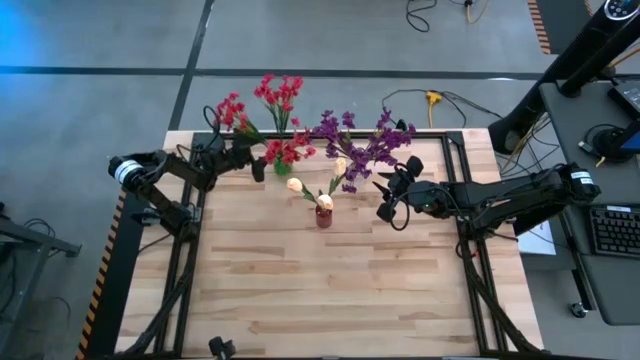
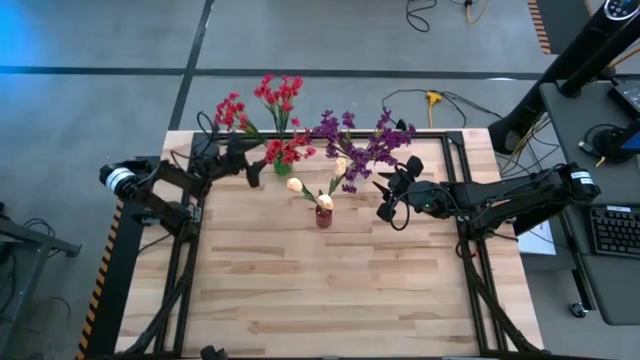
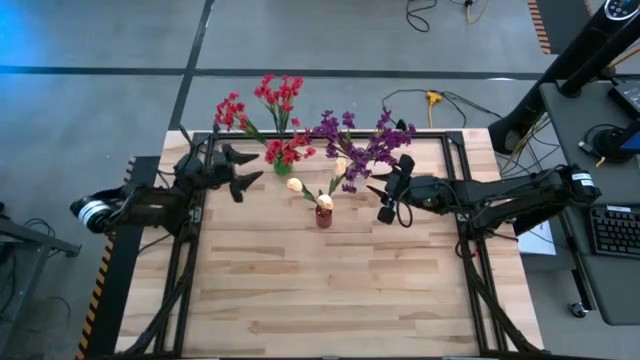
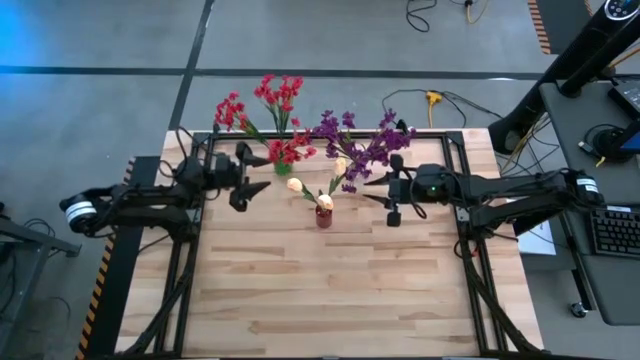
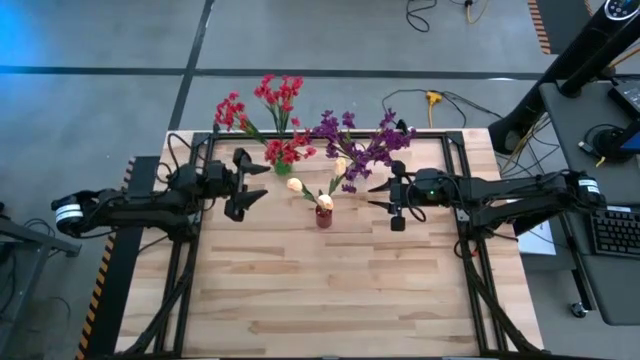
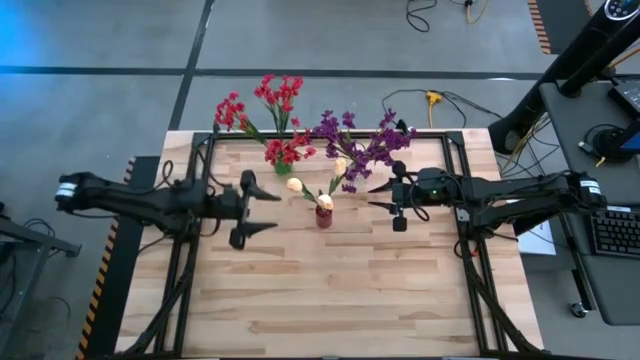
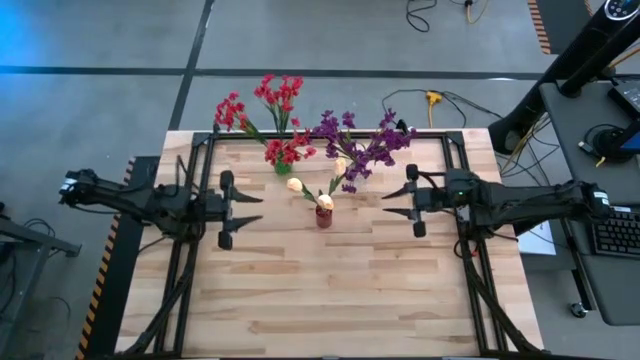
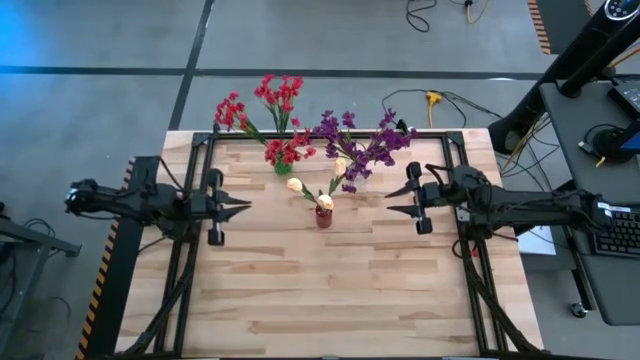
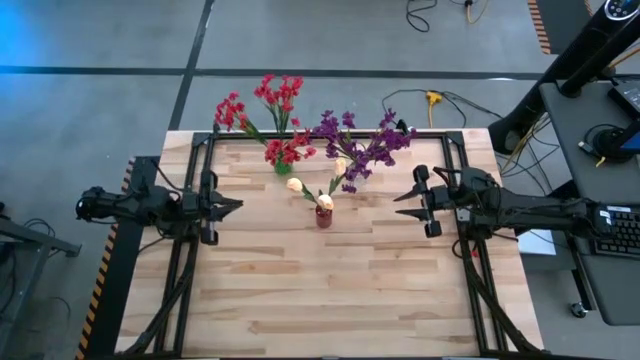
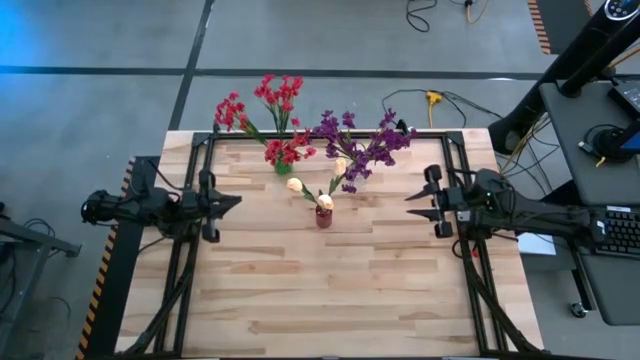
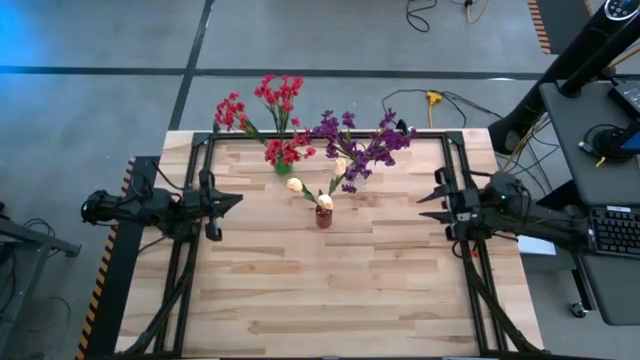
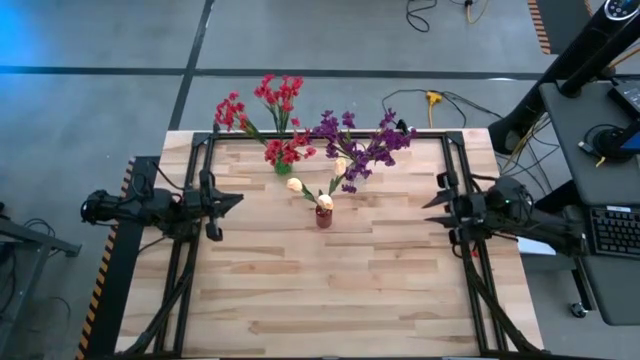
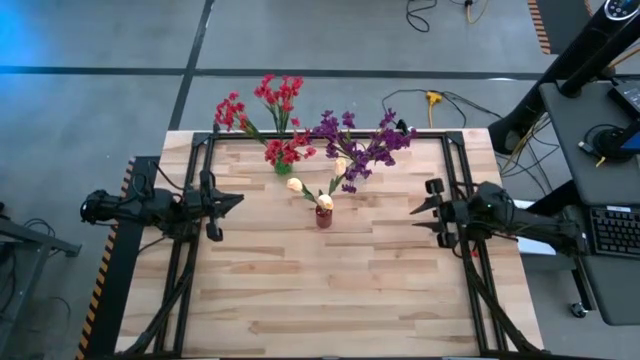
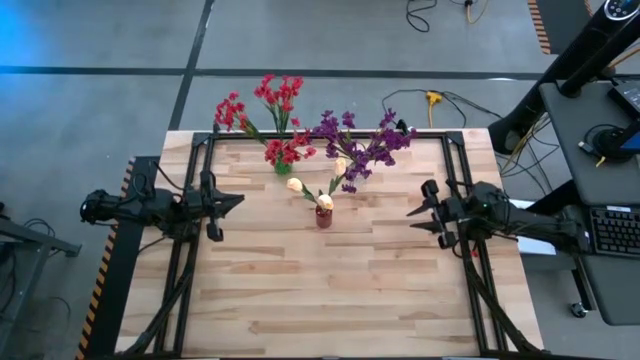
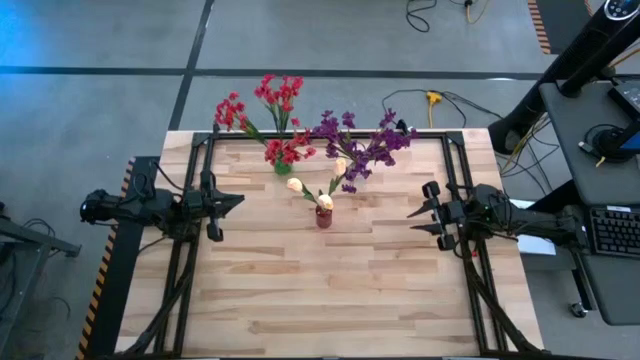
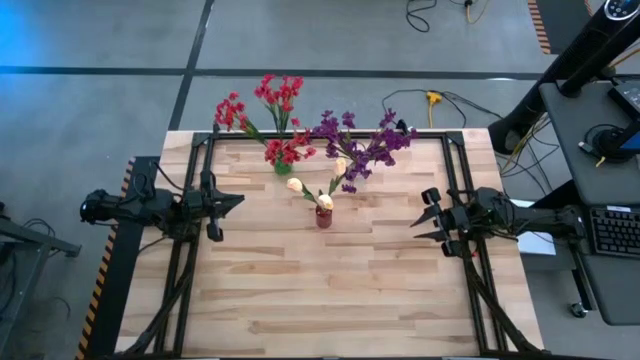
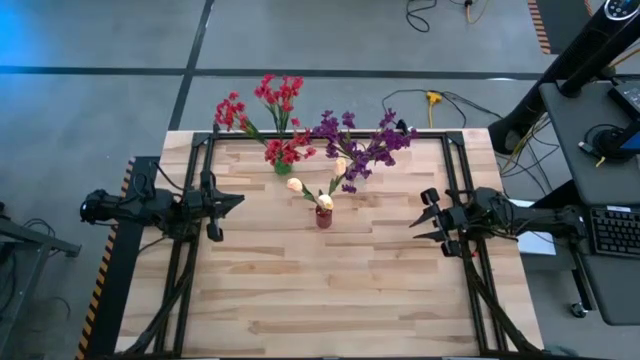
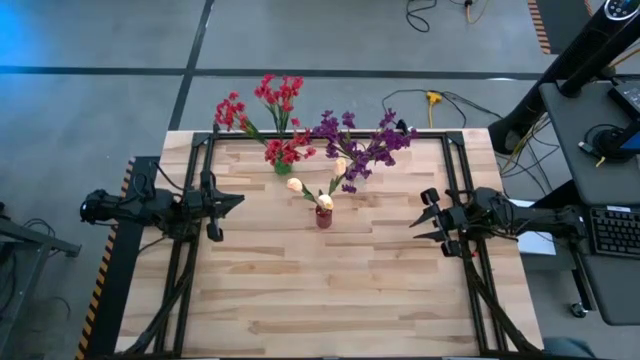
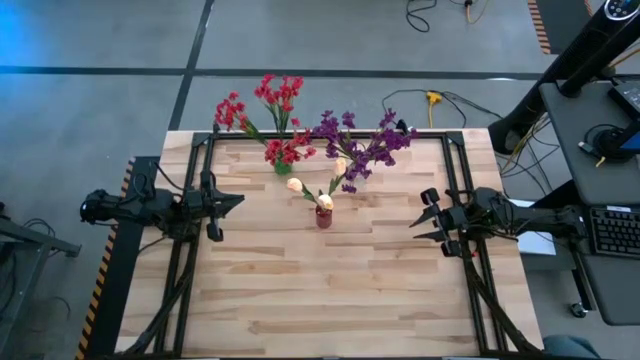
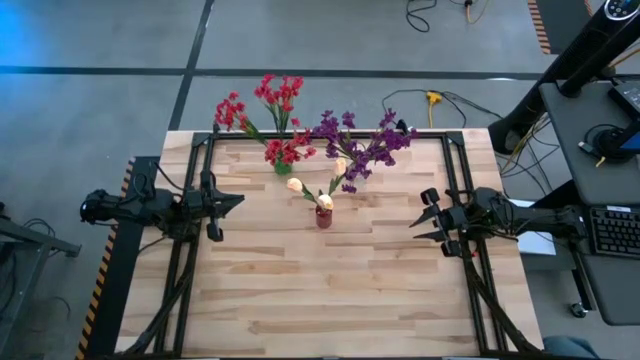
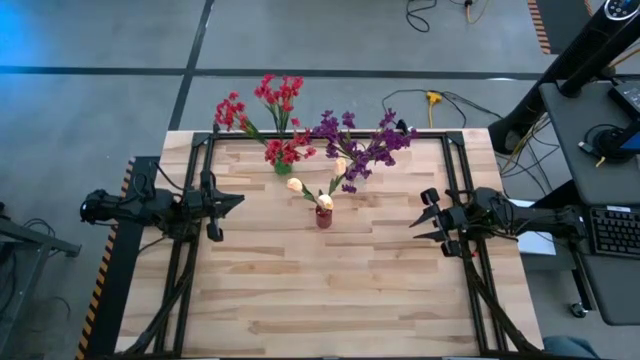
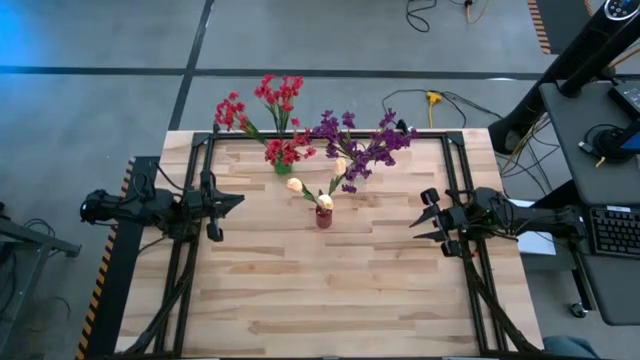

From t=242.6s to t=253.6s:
Task: Sort flowers into vase by color
Return to Home Position

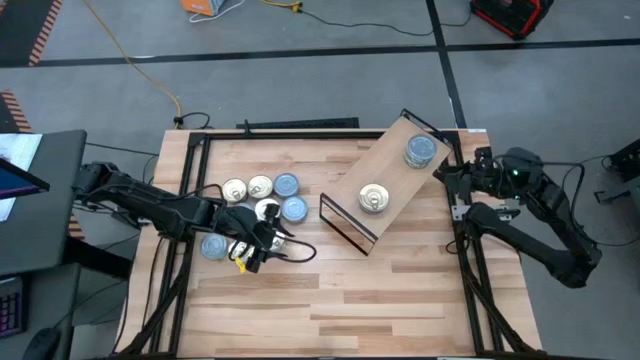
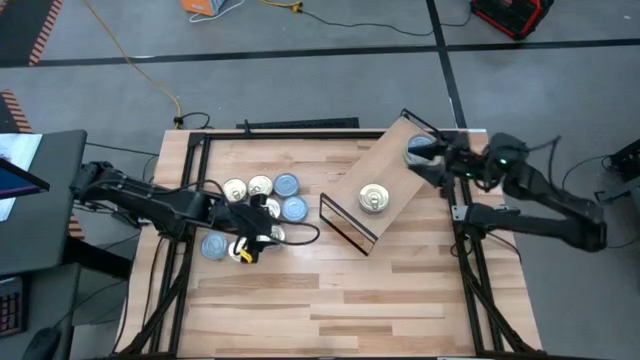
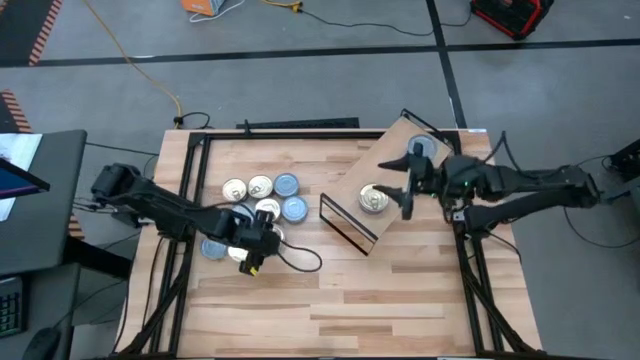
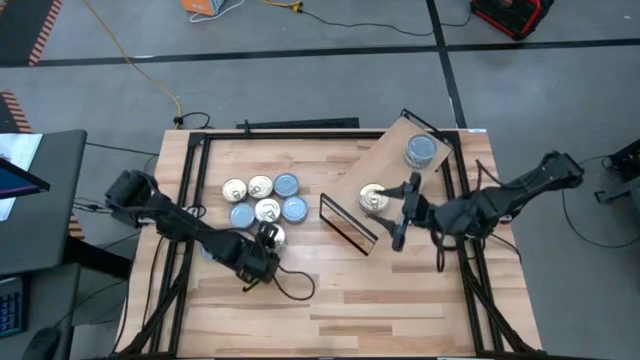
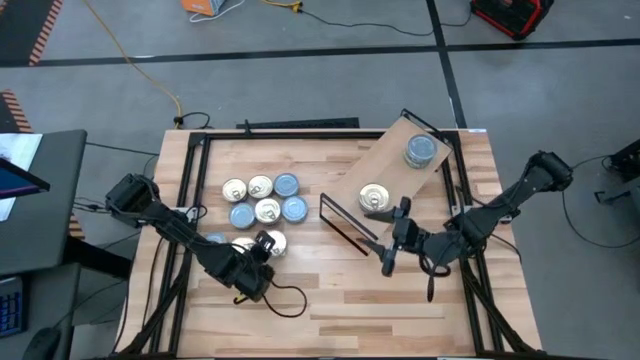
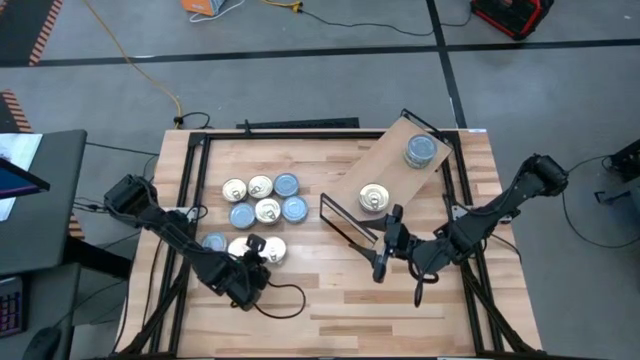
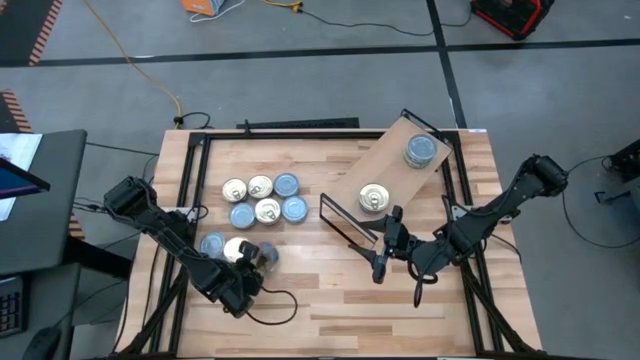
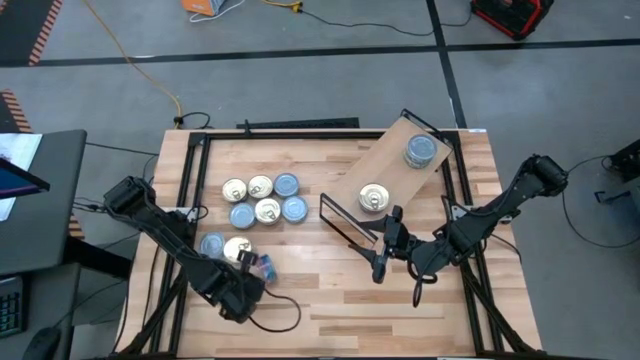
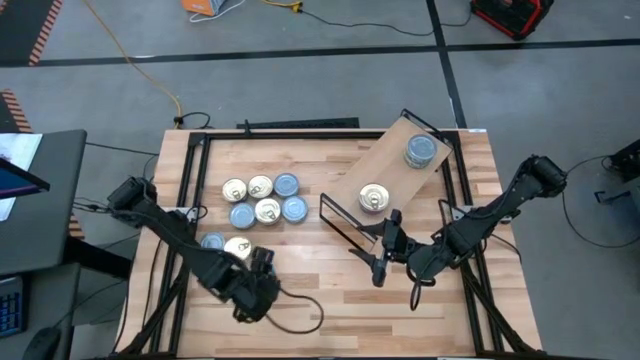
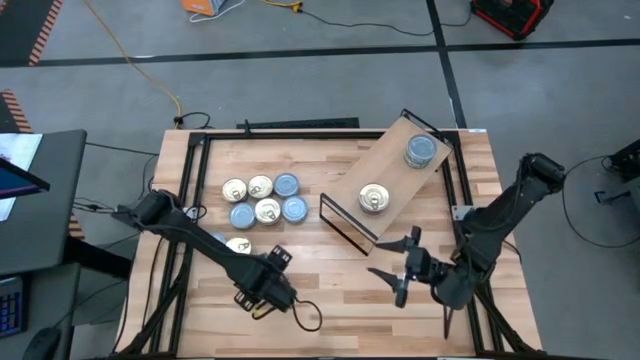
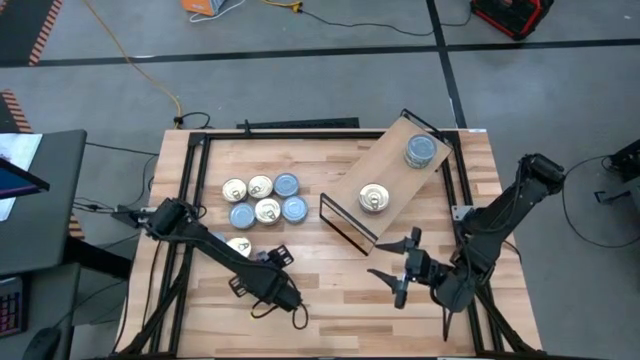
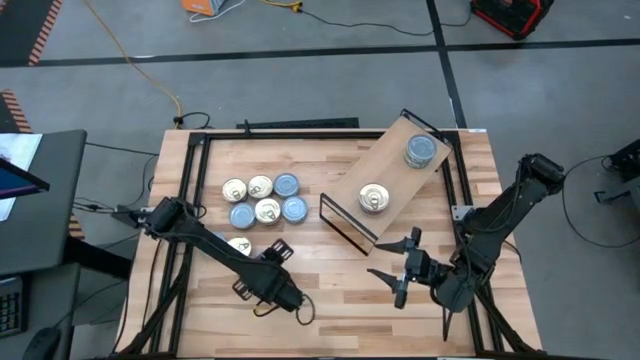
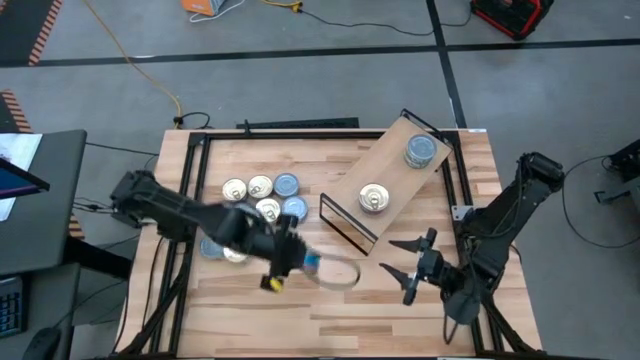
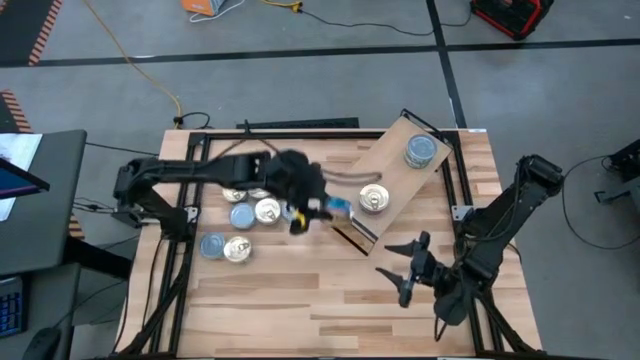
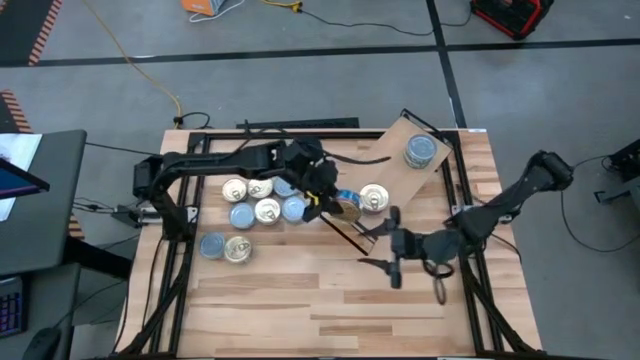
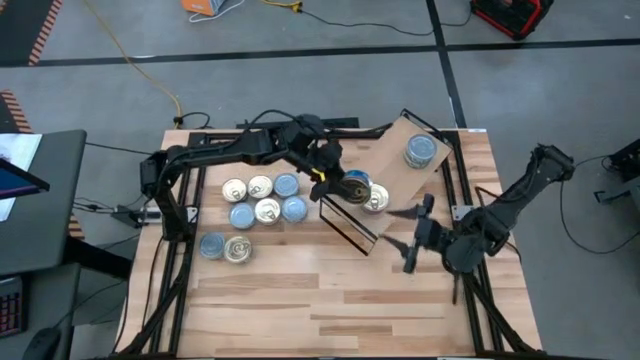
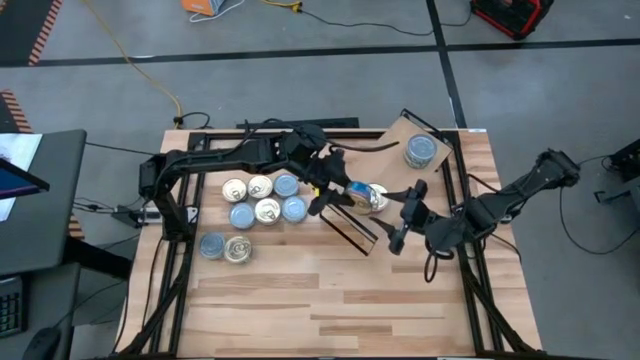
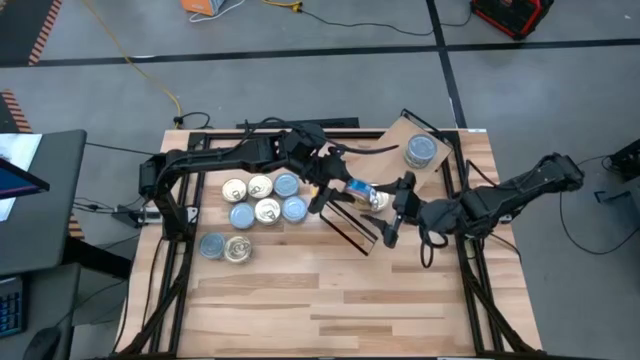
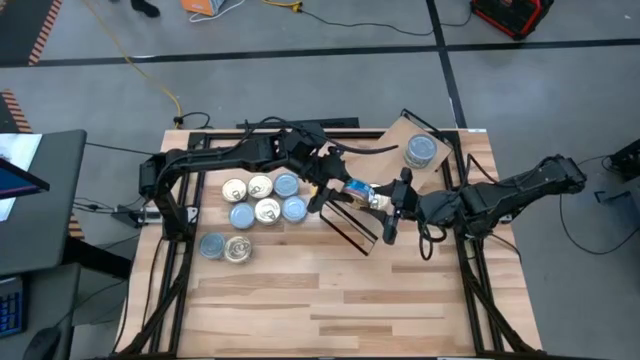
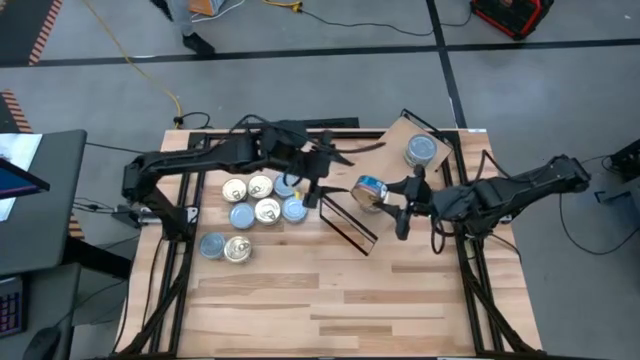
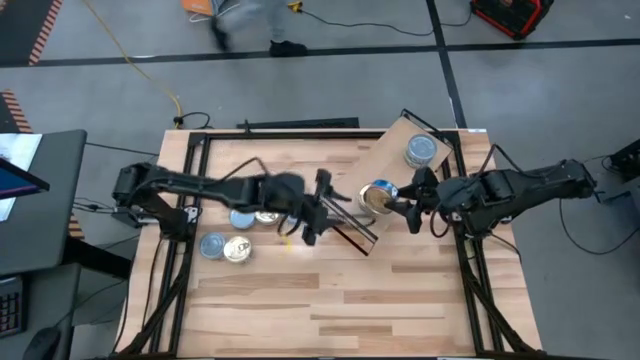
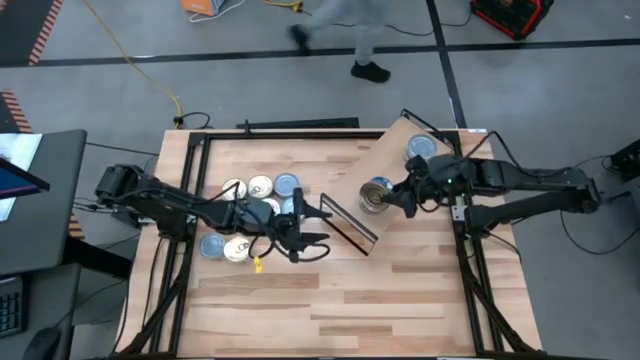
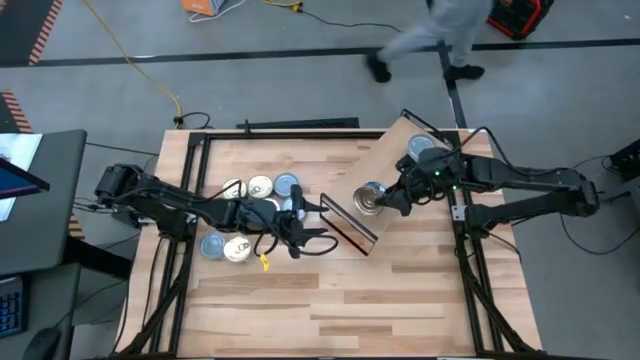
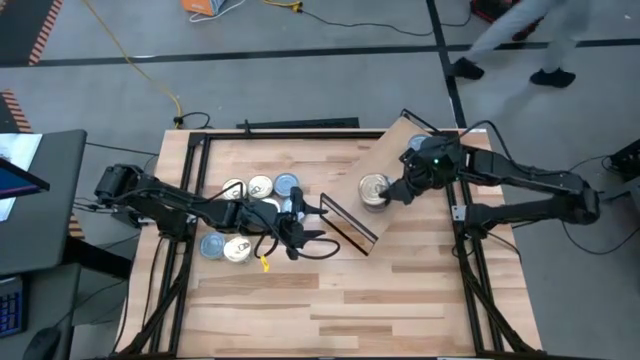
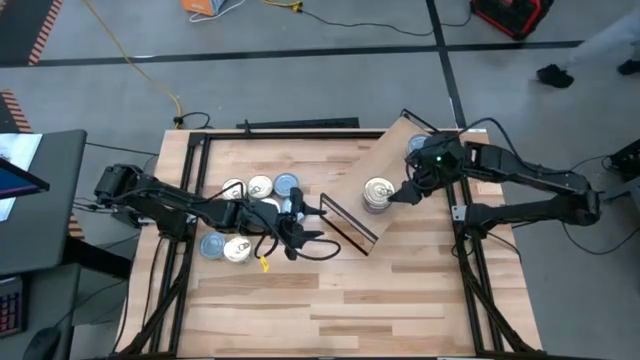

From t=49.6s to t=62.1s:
Task: Stack canned seafood by type on shelf
Stack the blue and pink tuna can on the shelf
